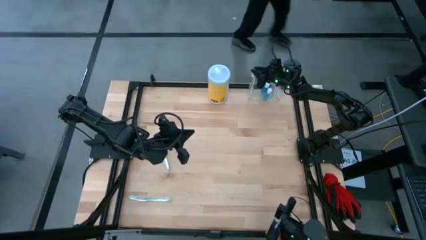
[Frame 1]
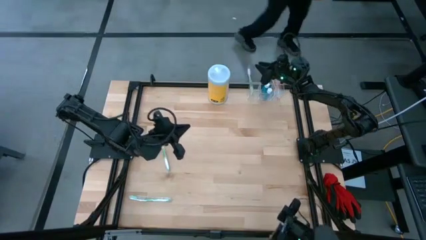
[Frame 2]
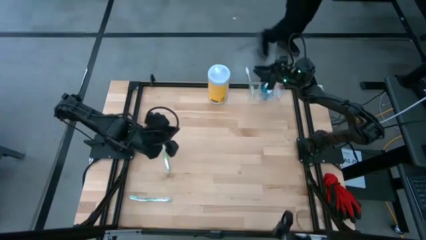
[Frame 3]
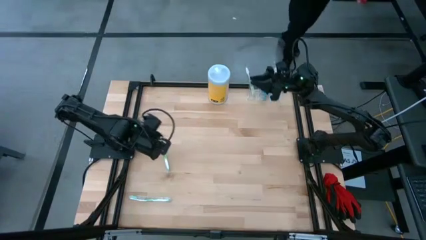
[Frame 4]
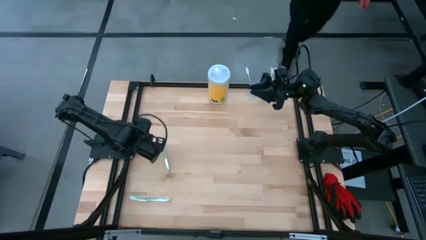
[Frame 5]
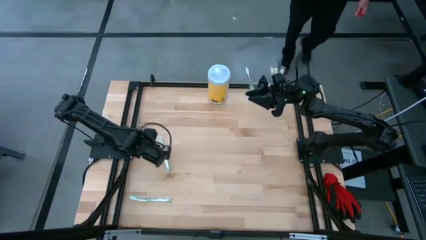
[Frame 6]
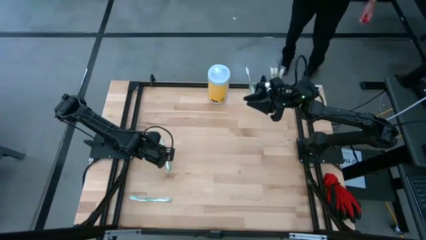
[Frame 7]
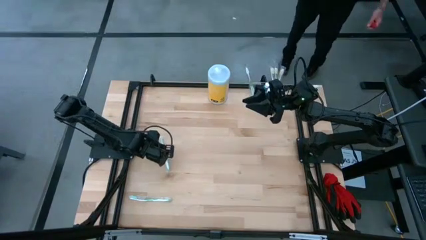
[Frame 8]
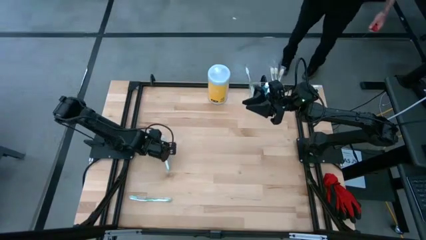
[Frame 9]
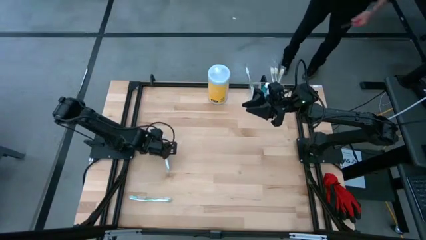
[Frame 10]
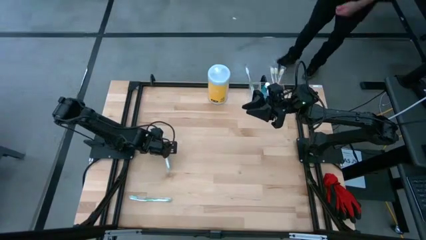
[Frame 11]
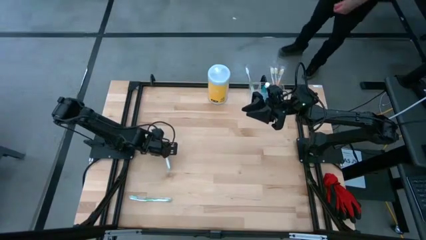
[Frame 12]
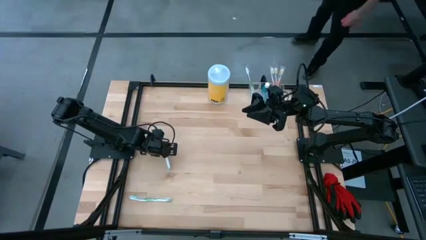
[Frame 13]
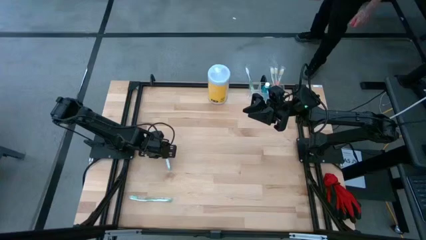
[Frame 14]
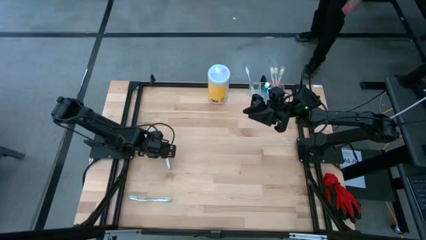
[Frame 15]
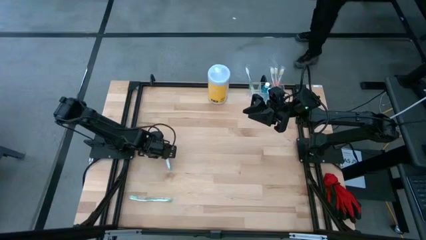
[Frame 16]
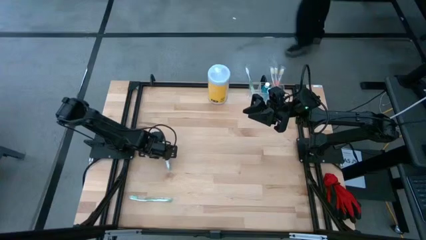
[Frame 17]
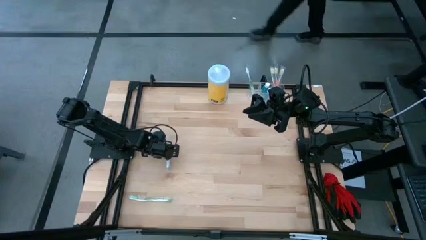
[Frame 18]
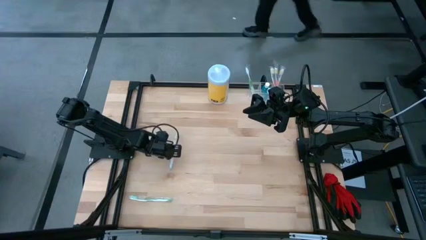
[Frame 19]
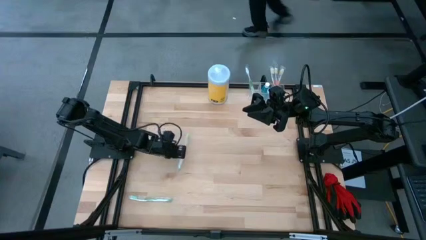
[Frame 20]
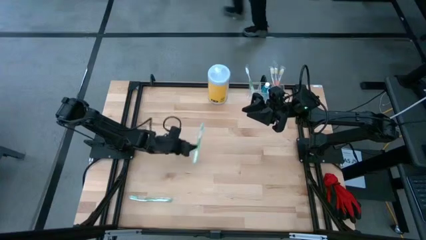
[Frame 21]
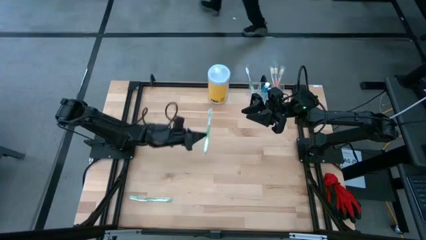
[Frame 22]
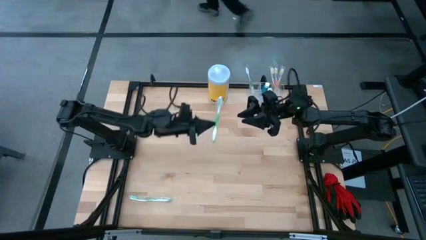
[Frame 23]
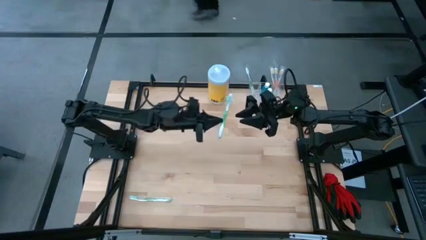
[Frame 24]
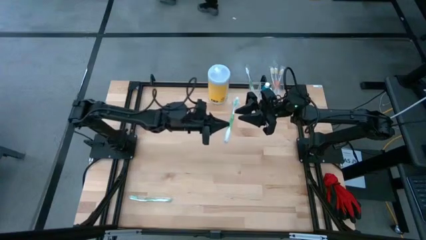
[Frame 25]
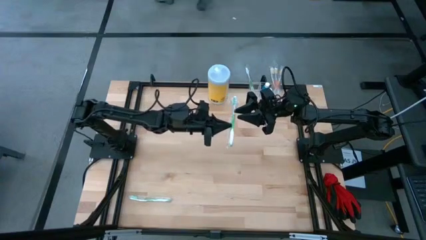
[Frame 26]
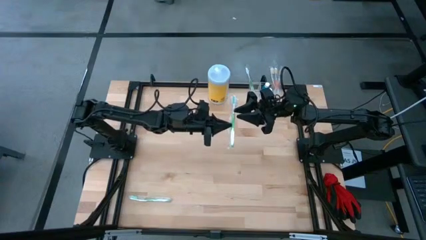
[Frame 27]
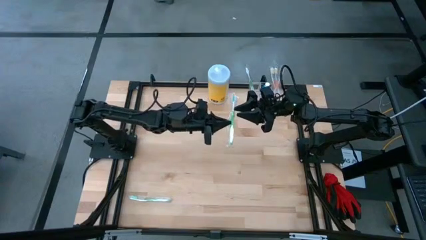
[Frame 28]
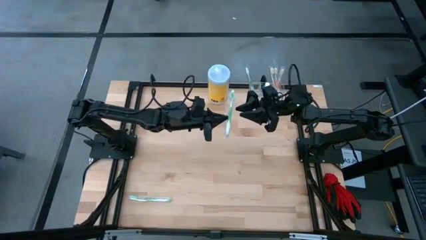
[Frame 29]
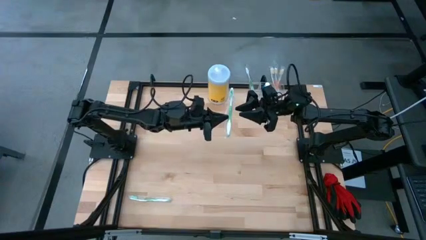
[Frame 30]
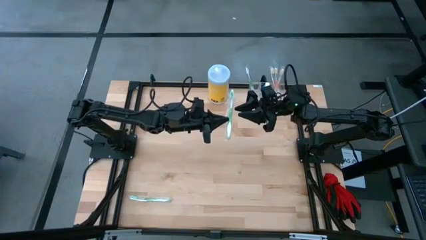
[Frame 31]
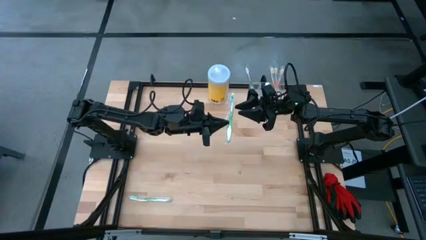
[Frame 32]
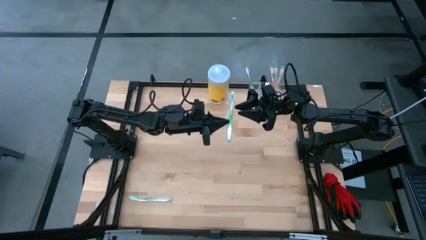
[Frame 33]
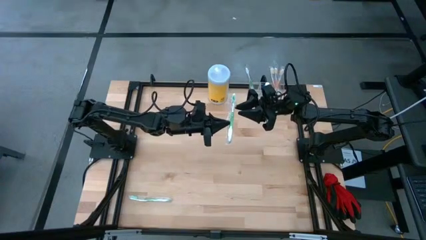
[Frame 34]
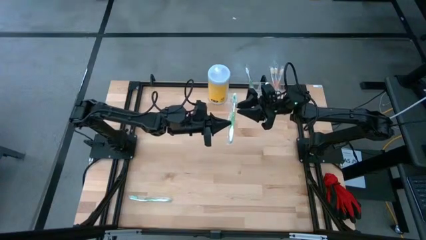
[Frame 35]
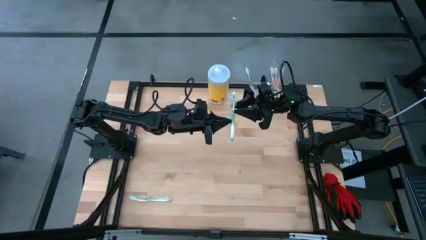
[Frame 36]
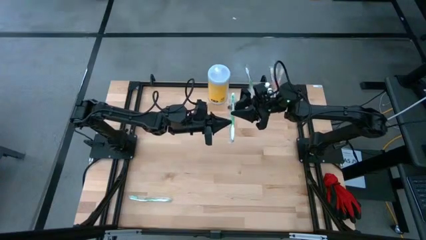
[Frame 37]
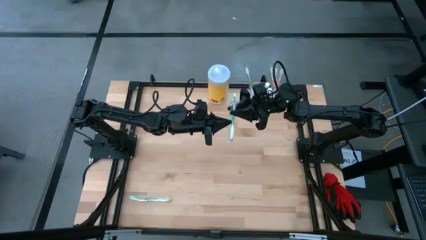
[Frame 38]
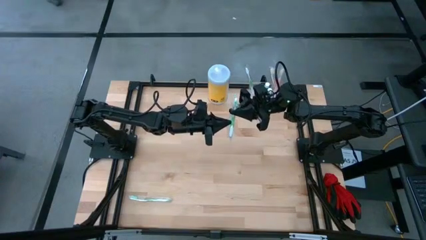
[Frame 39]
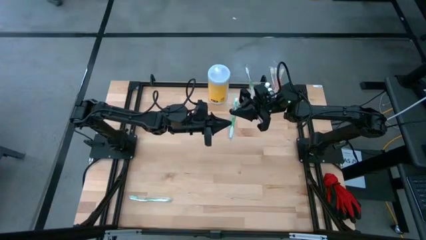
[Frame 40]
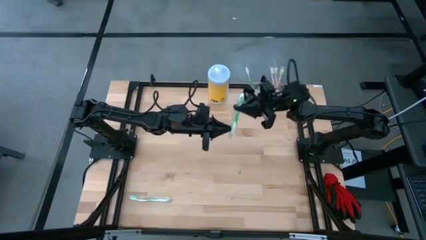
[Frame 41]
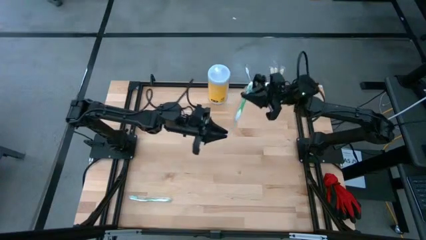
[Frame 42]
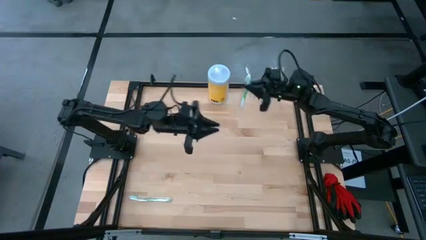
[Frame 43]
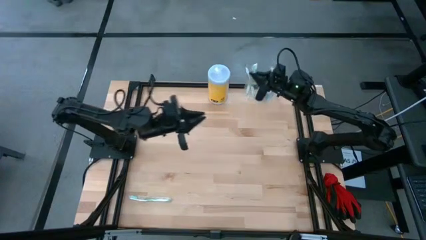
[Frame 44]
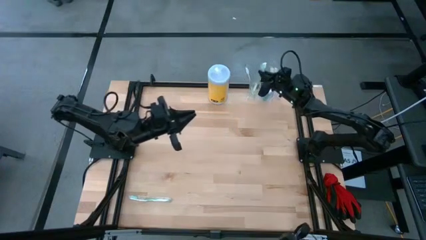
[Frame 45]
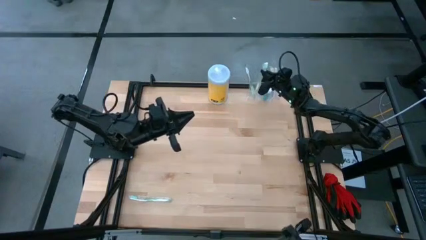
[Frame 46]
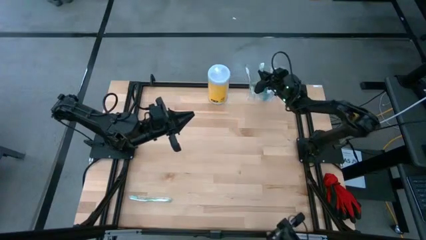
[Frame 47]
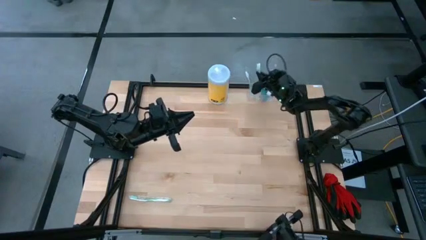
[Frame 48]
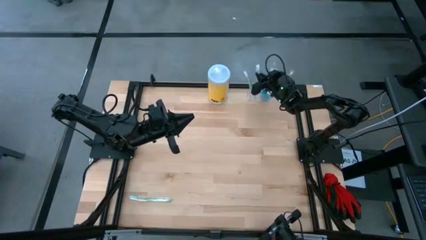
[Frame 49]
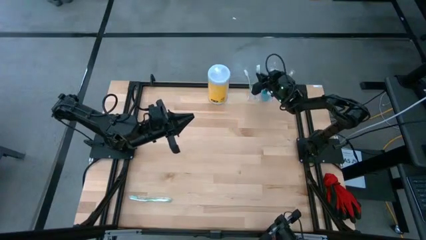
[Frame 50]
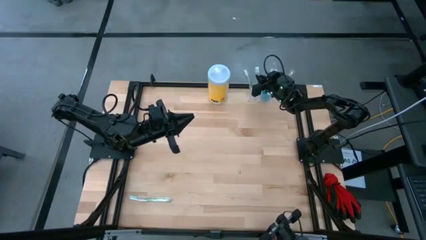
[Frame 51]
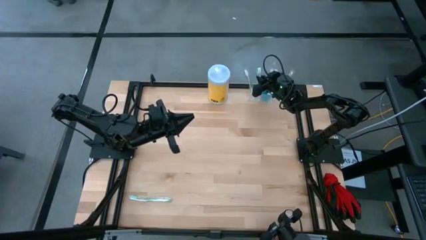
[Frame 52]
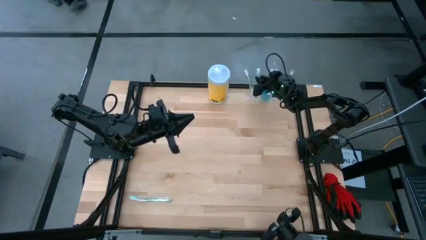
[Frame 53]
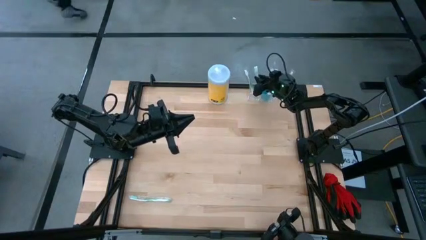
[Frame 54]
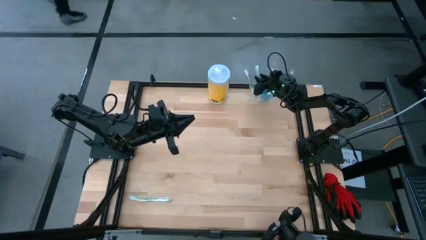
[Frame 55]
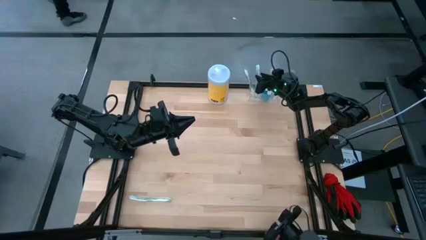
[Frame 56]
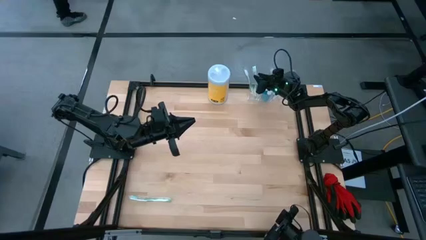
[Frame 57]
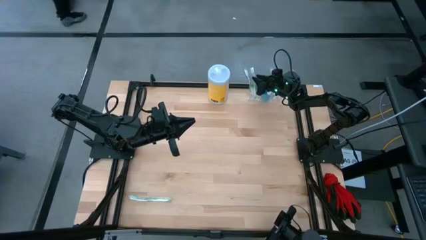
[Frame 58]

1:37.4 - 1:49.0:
Task: Pick & Place toothbrushing station
Put the top green toothbrush into the transparent organizer

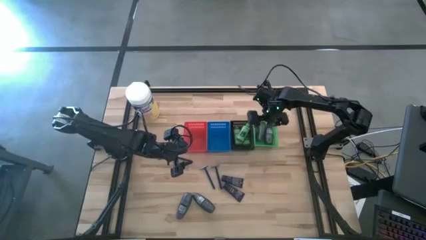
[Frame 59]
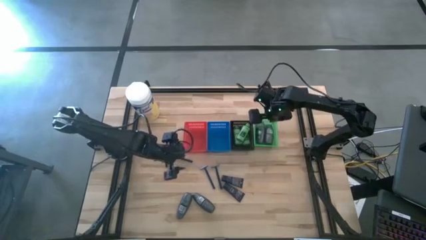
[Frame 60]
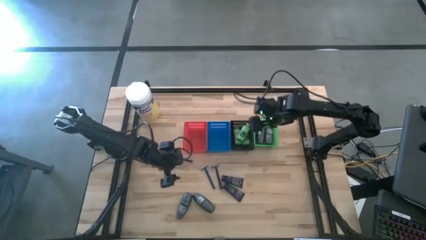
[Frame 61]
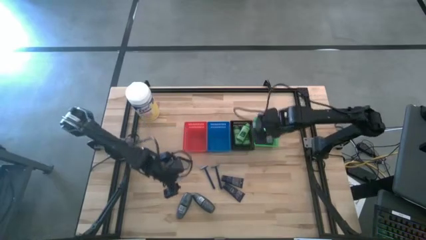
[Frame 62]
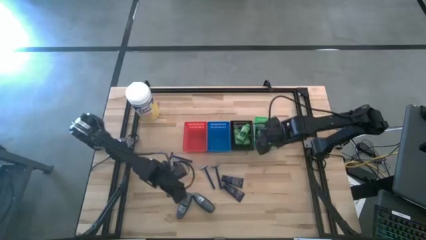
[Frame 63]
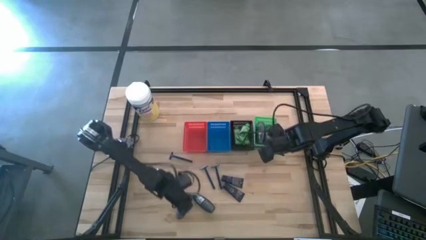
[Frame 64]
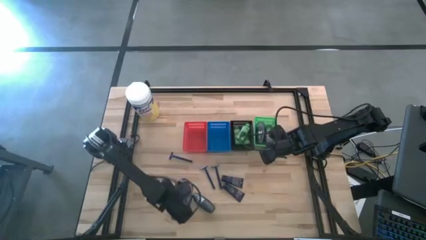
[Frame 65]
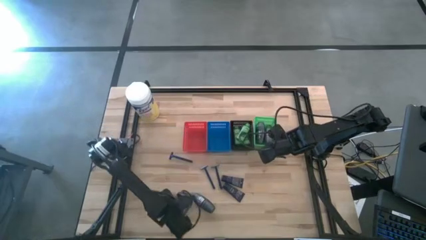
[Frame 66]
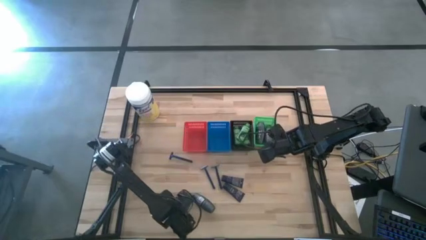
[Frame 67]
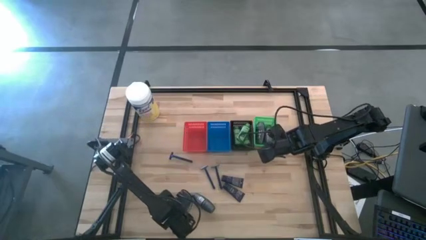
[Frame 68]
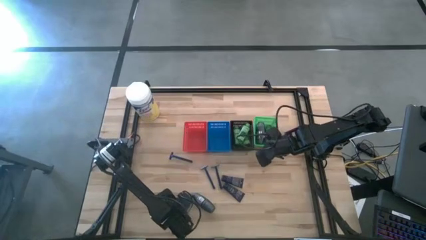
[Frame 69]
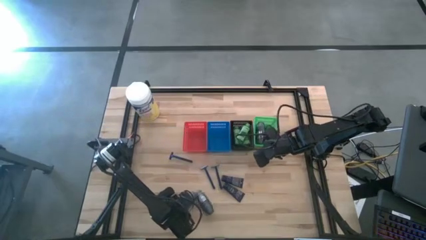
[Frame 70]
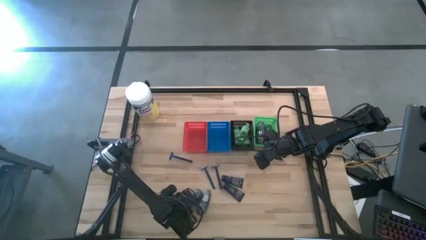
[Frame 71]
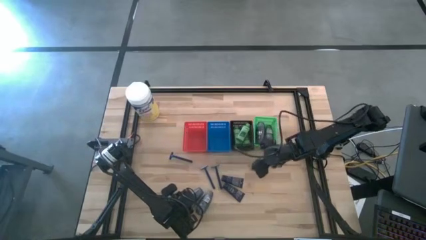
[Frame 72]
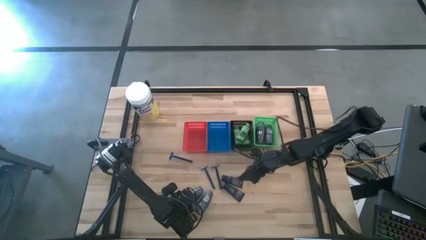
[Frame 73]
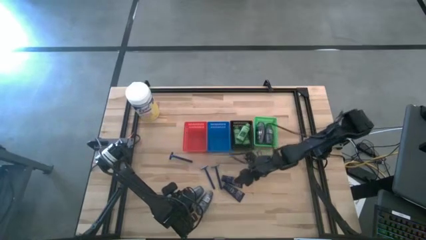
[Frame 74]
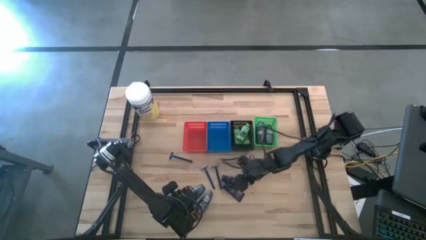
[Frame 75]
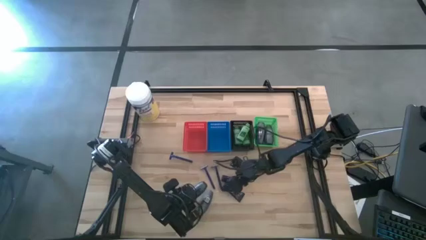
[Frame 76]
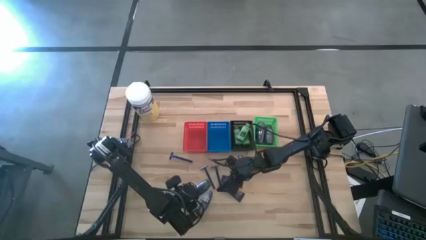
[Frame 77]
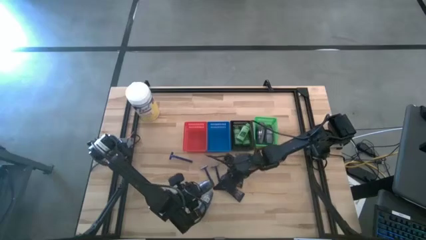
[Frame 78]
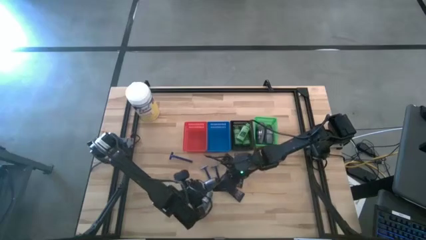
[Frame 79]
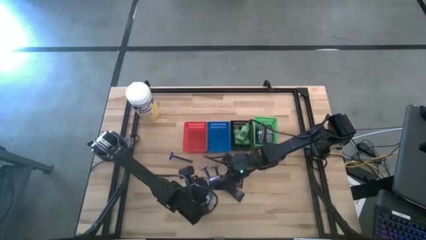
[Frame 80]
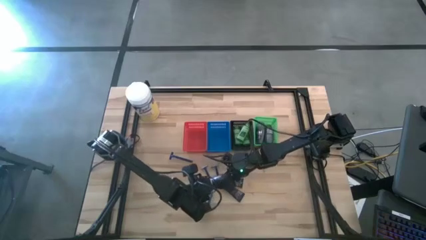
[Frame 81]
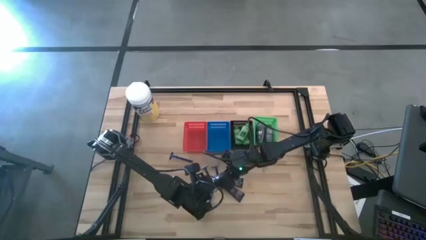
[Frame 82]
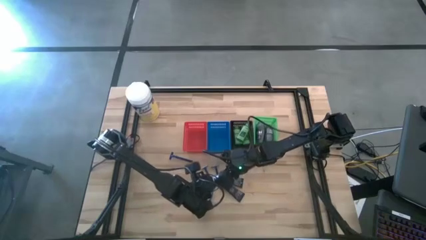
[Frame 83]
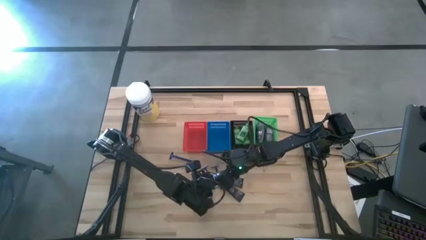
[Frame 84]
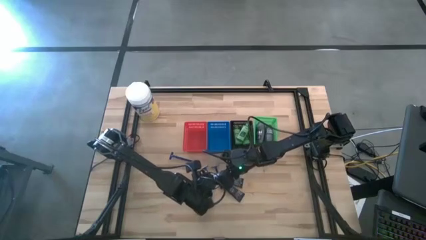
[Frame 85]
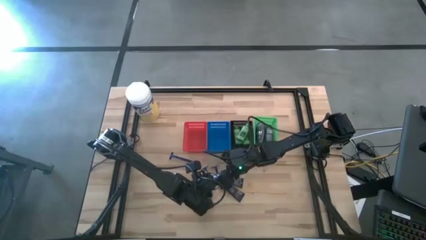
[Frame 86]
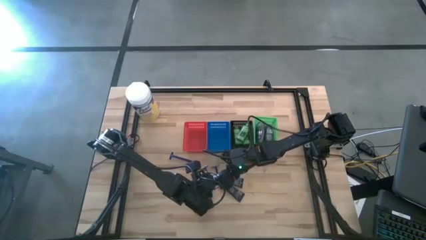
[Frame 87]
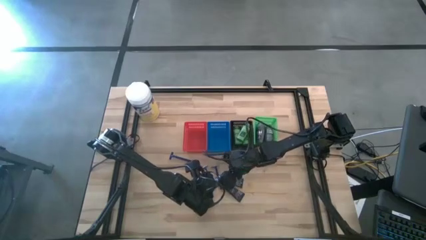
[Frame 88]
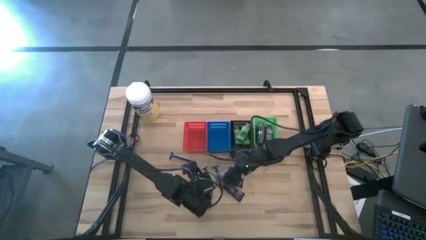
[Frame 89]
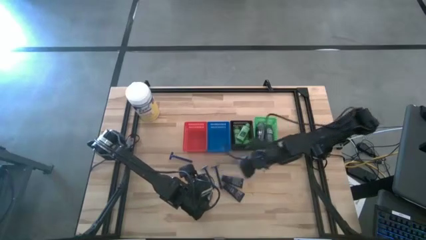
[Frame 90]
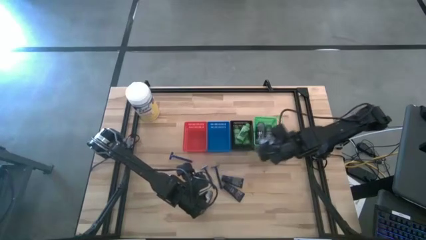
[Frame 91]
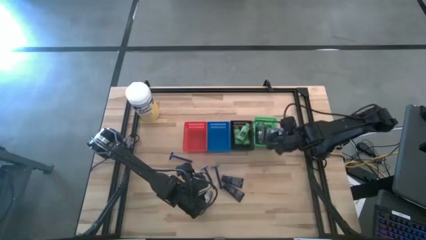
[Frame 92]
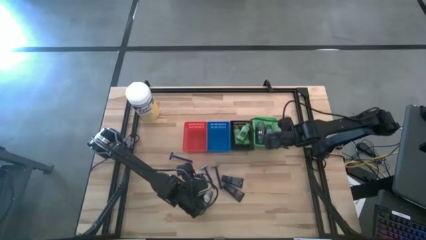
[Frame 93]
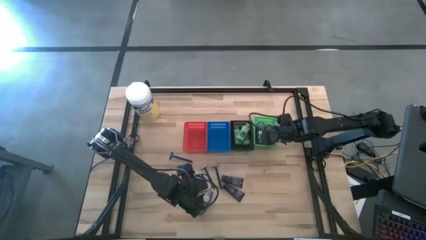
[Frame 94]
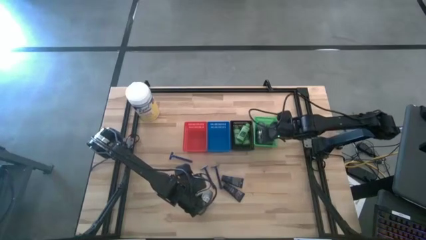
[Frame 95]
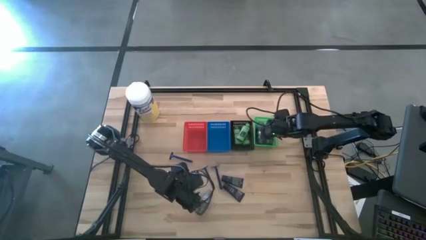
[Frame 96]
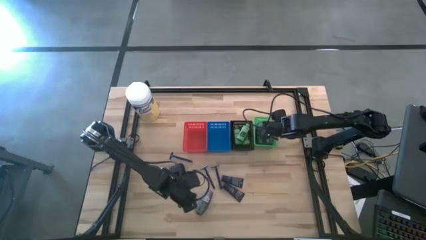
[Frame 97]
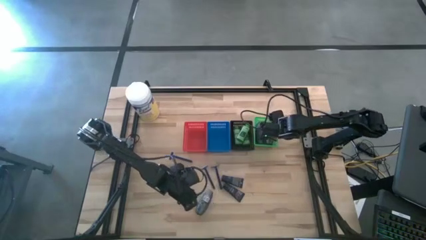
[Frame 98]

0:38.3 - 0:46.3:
Task: Pick & Place Travel size toiletries
Put the deodorant into the green basket
